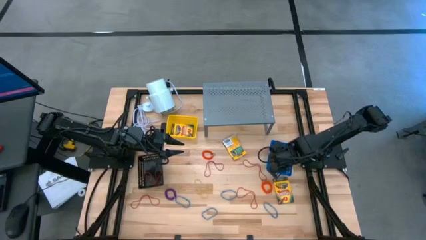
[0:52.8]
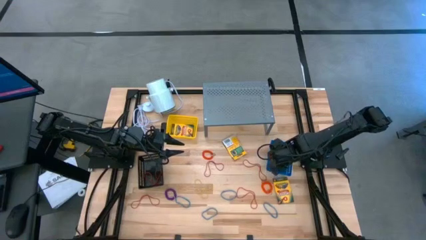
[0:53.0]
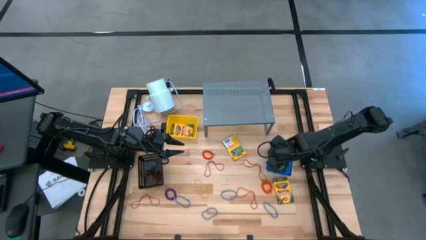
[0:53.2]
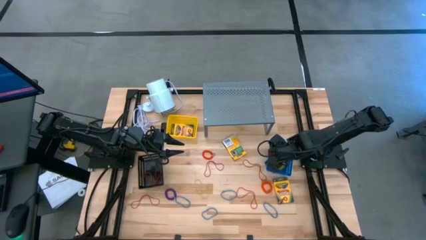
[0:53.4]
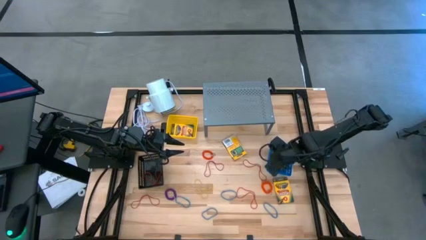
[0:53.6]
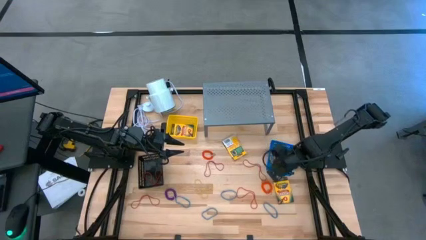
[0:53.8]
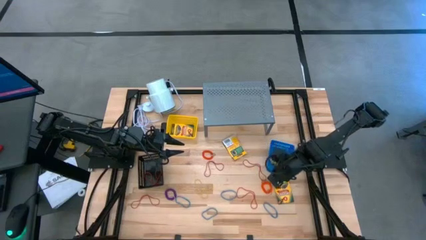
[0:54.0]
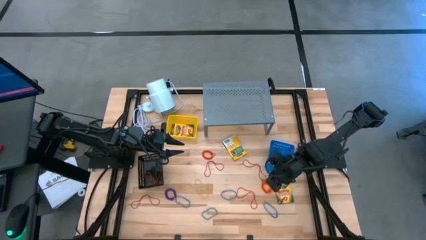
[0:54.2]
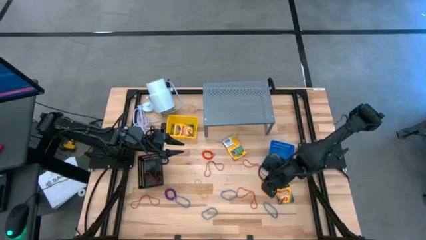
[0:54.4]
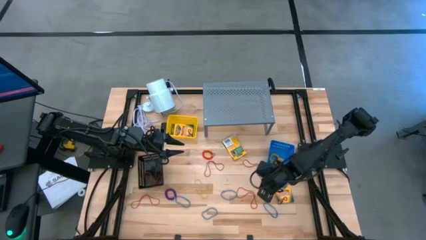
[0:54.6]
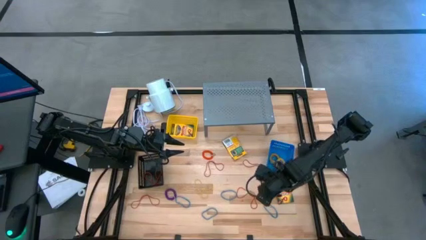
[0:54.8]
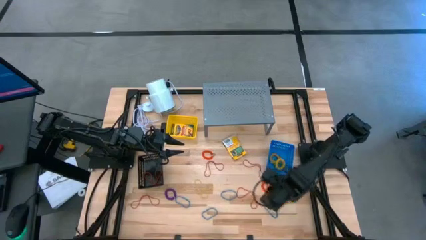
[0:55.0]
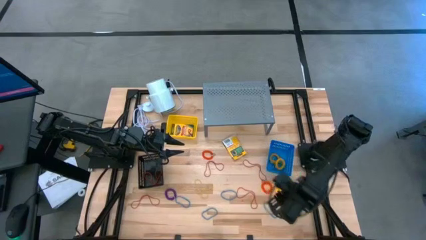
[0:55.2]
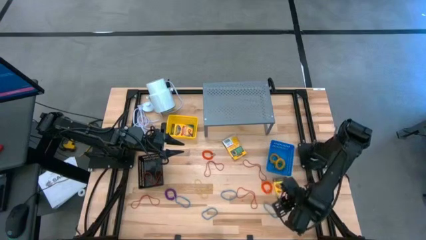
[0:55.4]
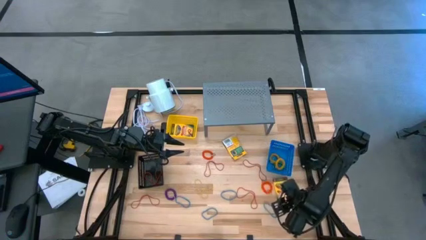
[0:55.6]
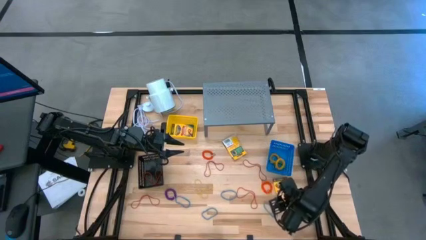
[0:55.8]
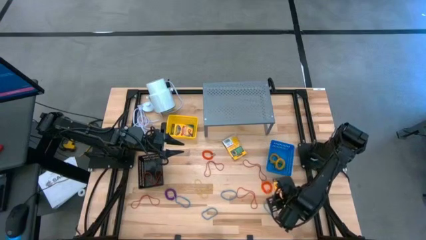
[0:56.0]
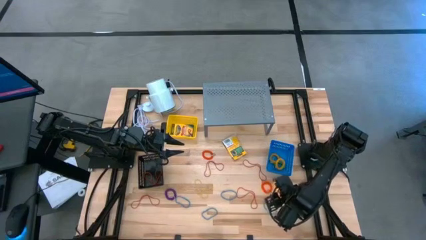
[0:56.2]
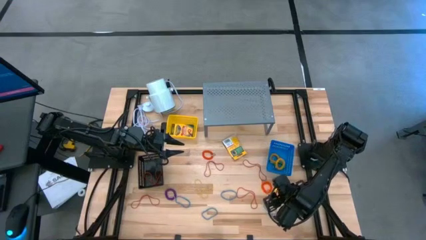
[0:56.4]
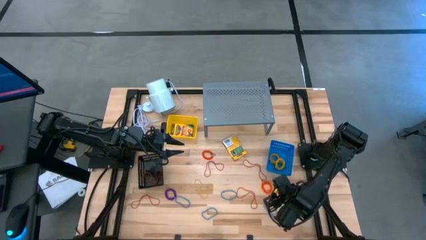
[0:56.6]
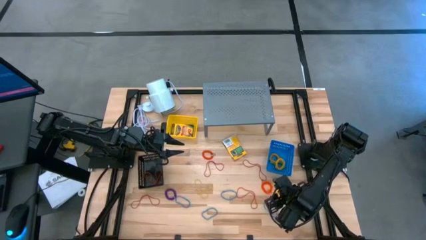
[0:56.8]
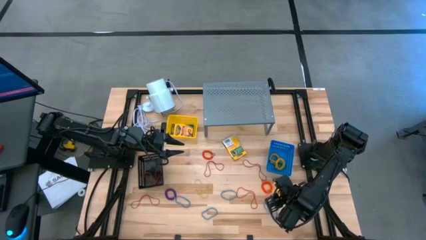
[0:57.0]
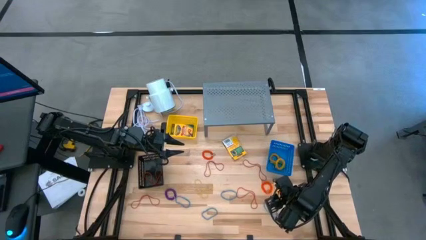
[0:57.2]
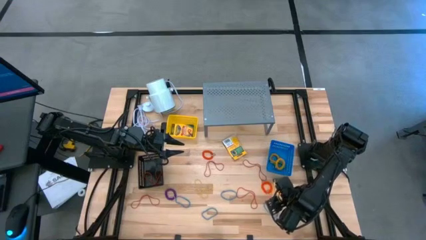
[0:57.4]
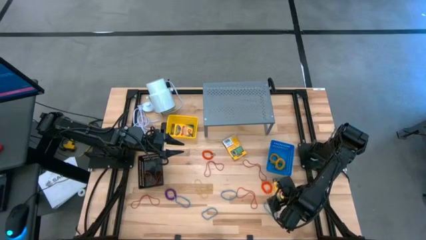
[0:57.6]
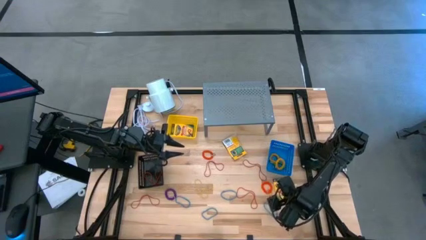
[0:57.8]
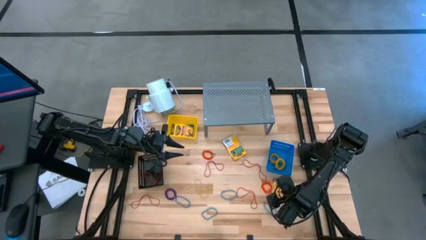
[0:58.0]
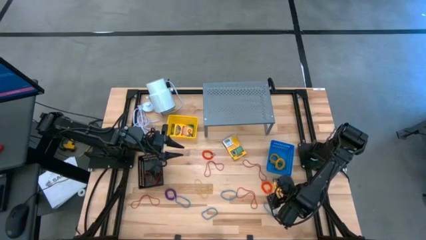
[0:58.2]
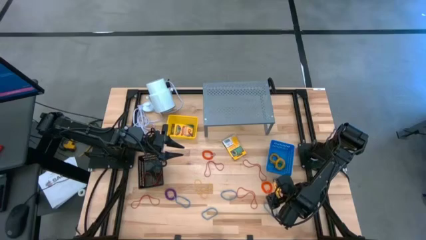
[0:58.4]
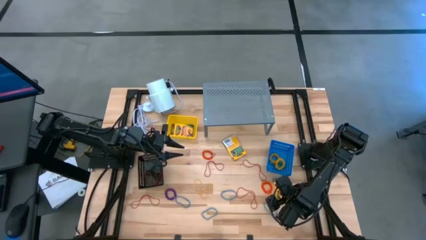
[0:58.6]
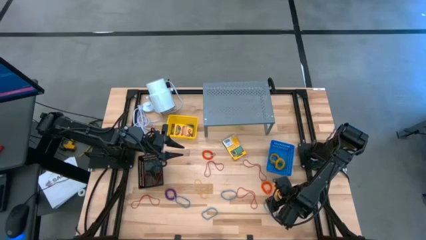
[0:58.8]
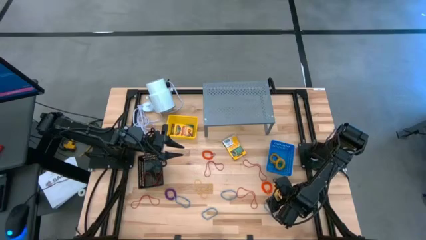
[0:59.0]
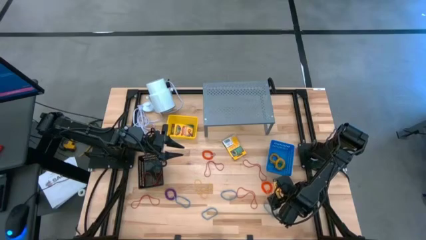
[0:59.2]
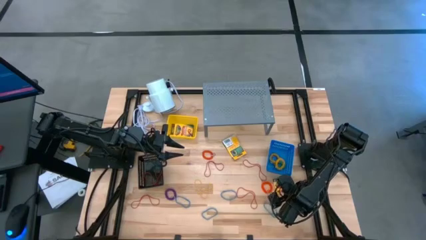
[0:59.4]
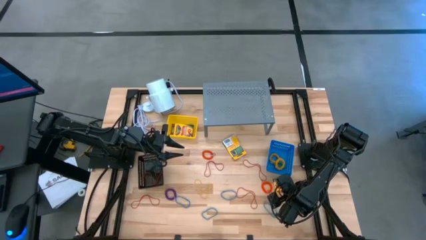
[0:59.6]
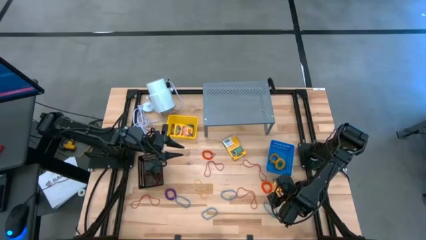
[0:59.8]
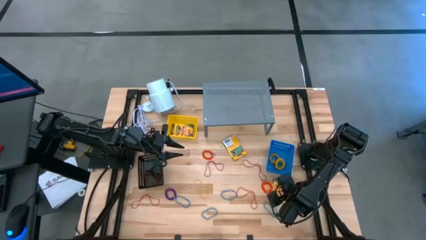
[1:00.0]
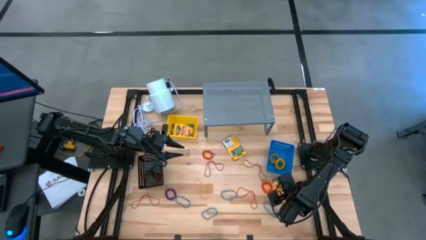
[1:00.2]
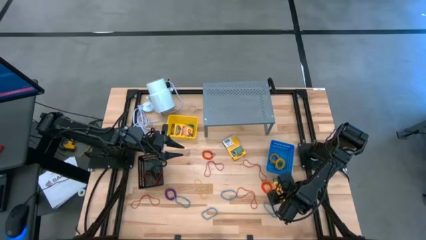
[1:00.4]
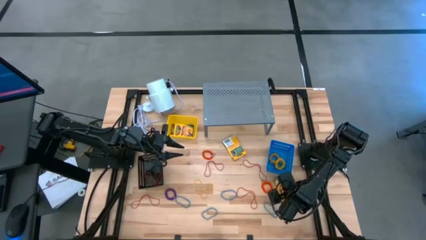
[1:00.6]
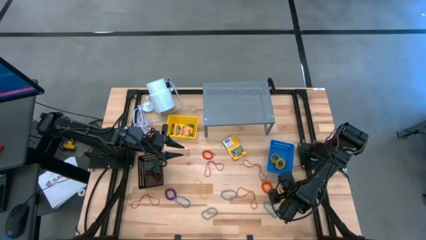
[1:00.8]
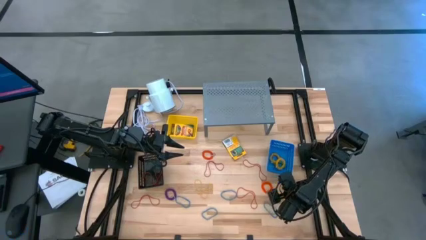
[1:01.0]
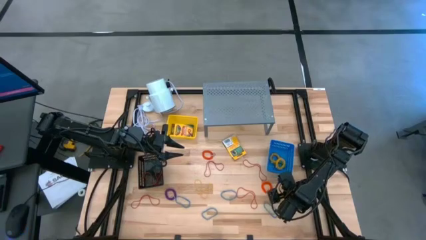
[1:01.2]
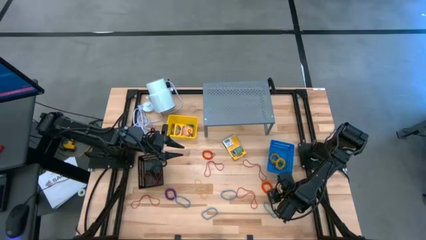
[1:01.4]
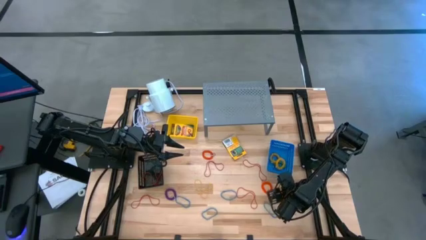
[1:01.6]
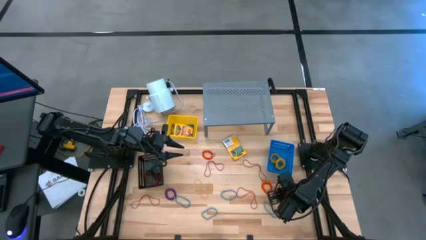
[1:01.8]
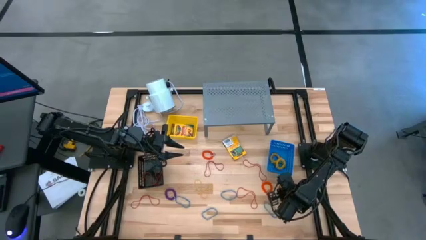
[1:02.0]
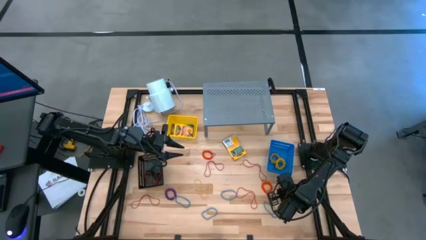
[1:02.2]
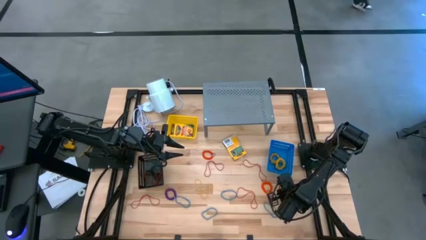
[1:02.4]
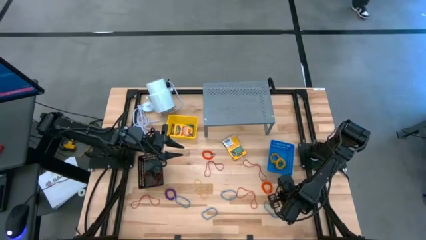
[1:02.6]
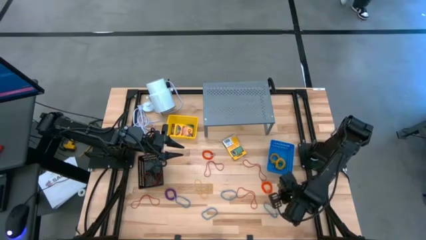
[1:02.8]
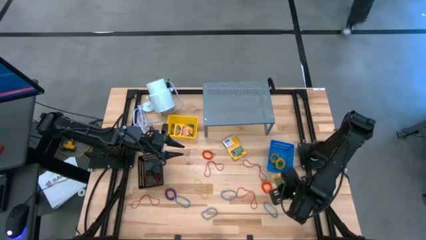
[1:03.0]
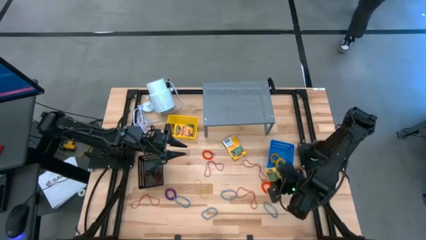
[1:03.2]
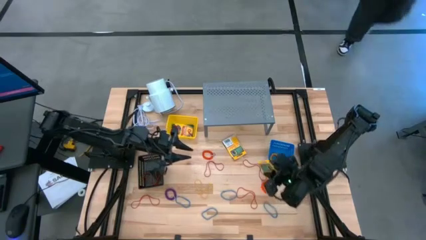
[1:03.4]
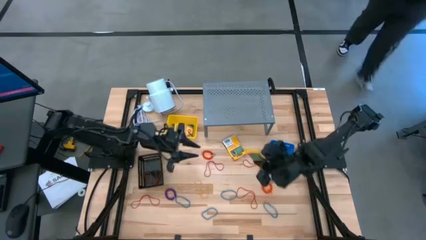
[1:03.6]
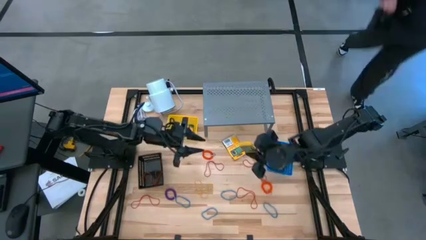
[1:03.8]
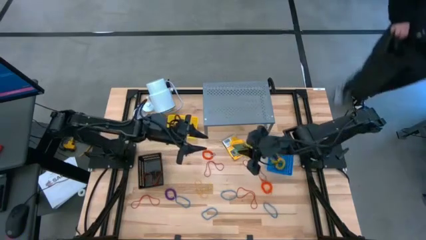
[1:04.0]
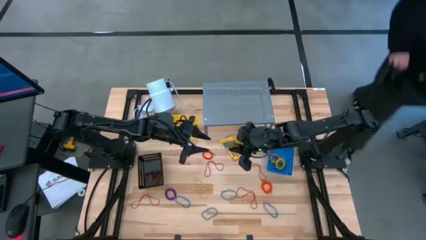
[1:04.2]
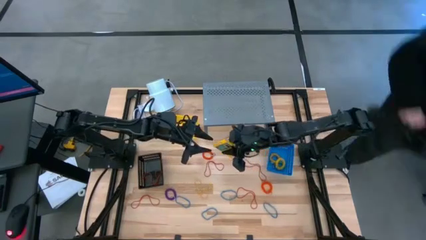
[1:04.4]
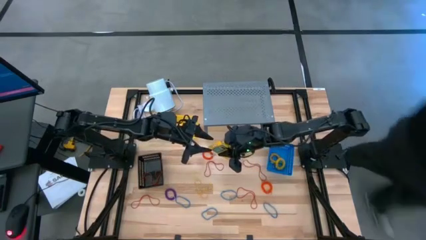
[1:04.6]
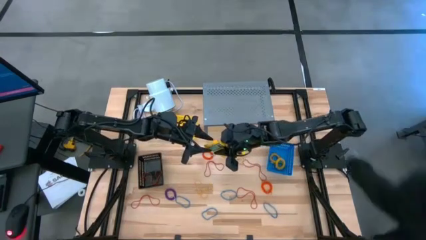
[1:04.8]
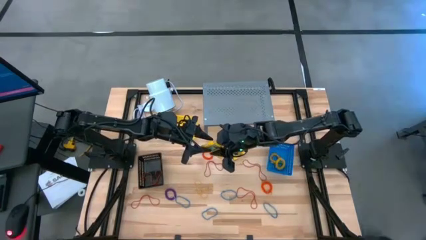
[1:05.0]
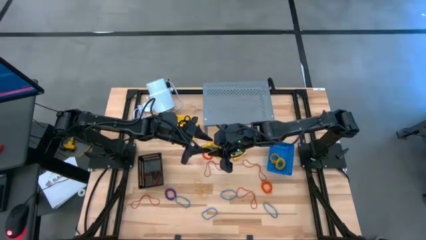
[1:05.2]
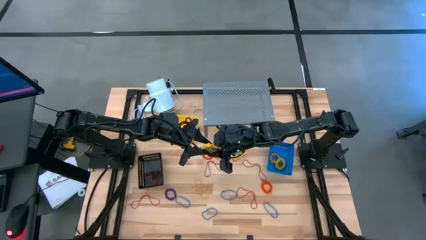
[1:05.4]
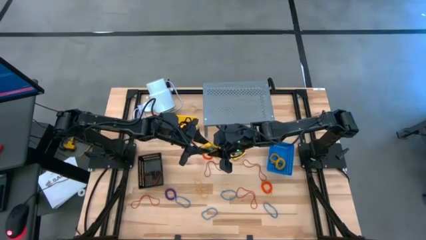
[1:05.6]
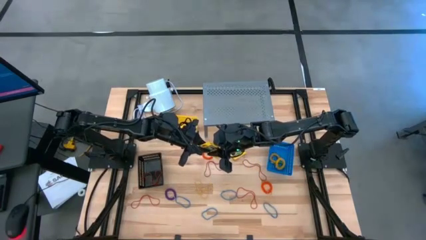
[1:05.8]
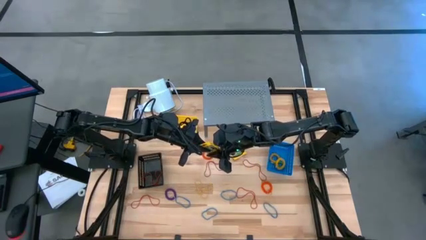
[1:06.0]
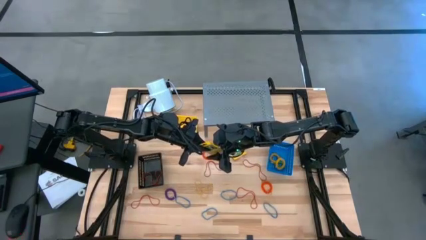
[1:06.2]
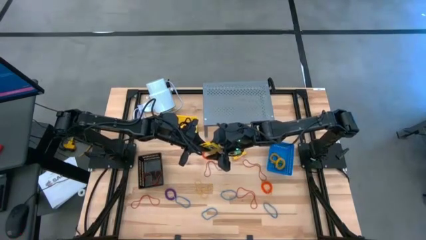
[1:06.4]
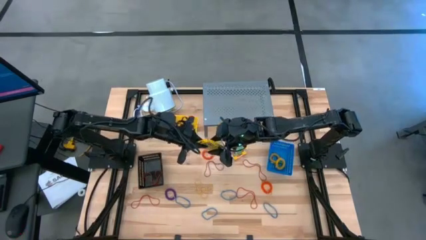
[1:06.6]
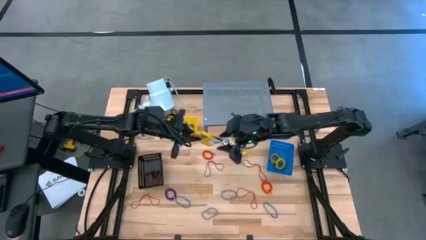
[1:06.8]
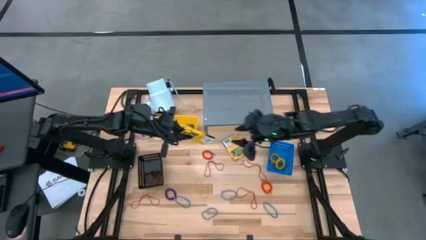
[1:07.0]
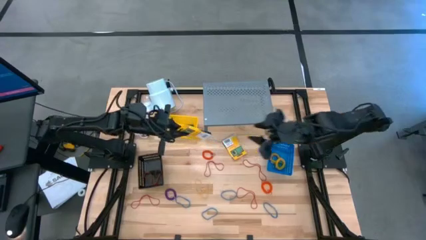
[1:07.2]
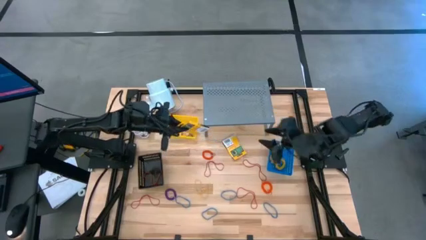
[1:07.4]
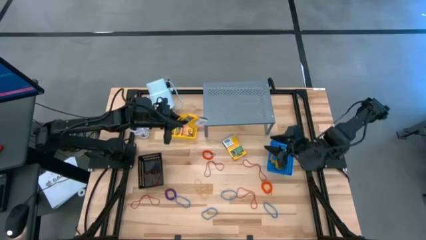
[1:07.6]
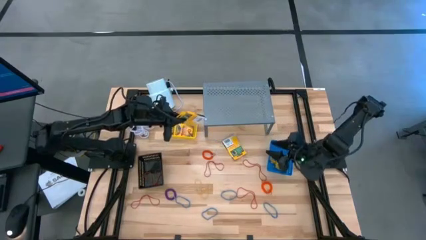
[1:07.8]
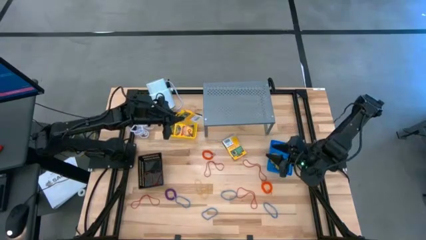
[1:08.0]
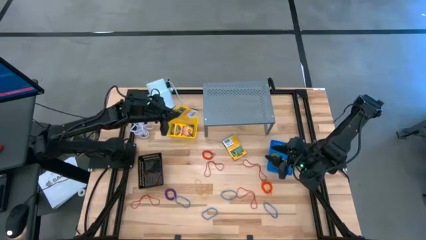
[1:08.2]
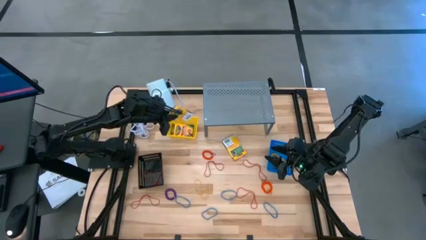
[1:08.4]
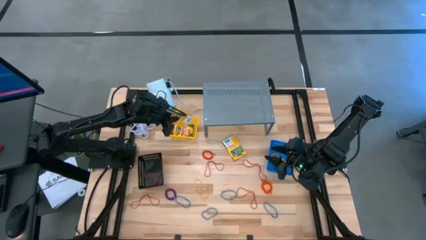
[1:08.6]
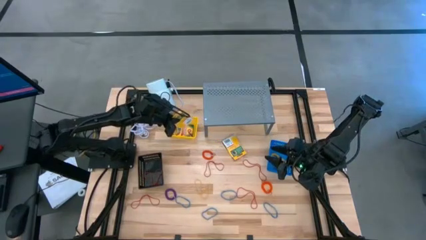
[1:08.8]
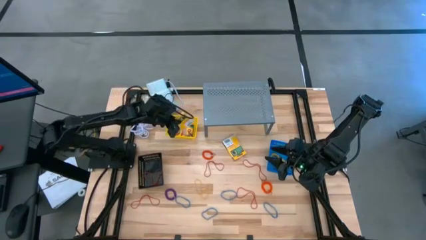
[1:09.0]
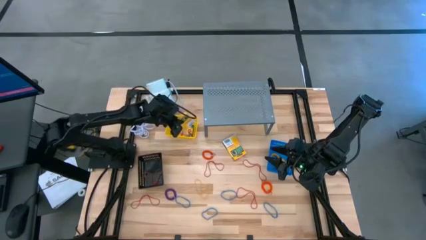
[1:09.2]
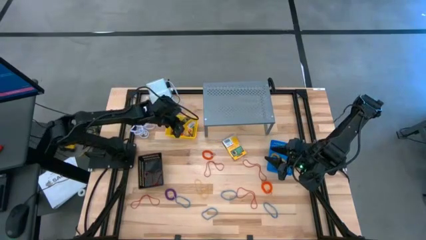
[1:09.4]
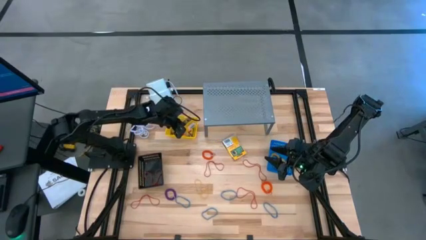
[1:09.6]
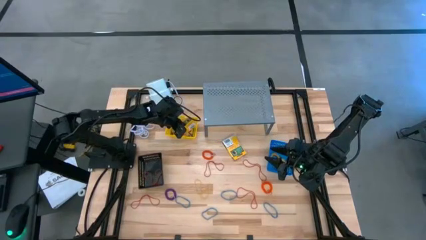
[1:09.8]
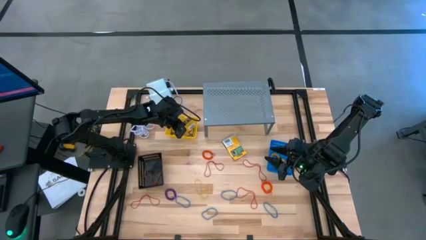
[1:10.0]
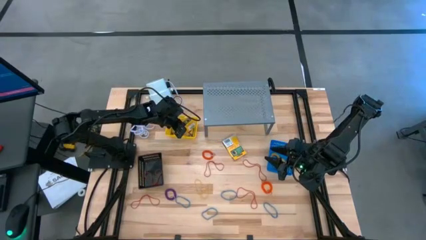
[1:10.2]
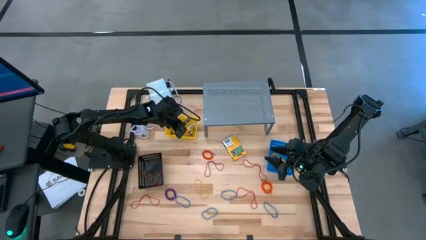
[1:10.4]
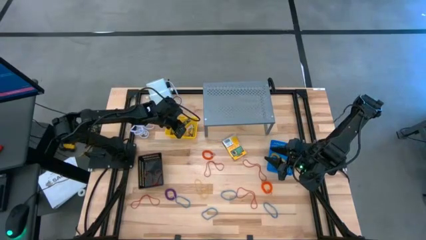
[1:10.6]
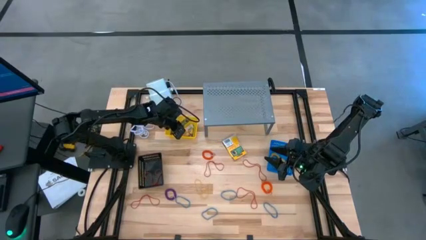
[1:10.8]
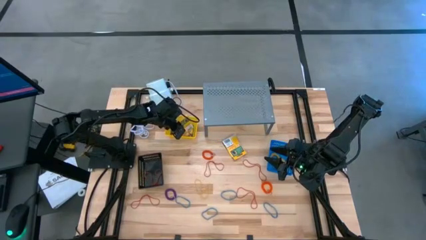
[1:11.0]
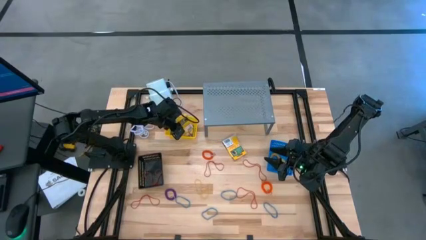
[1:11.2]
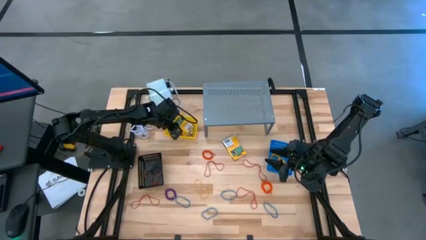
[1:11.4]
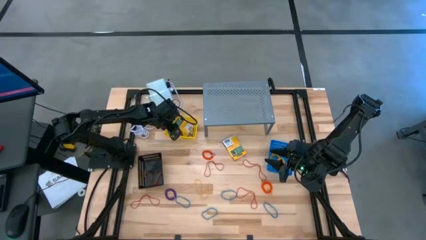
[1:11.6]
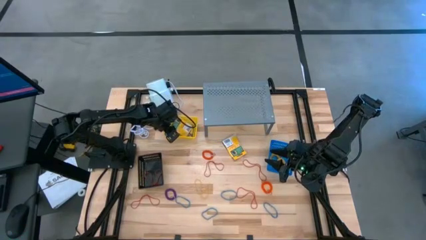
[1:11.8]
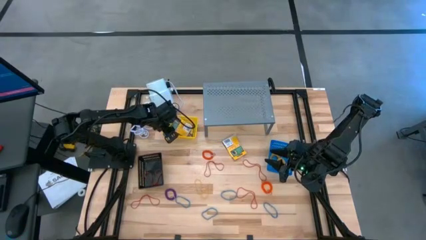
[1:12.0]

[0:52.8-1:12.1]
Task: Pick & Place Office Desk Supplies
Put the crayon box into the yellow bin
